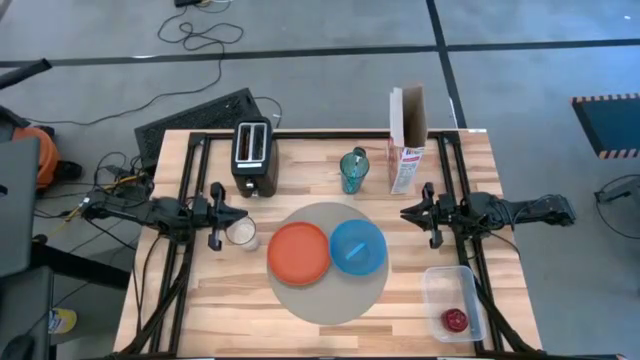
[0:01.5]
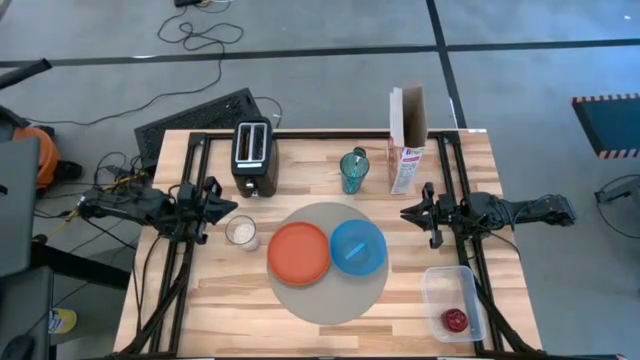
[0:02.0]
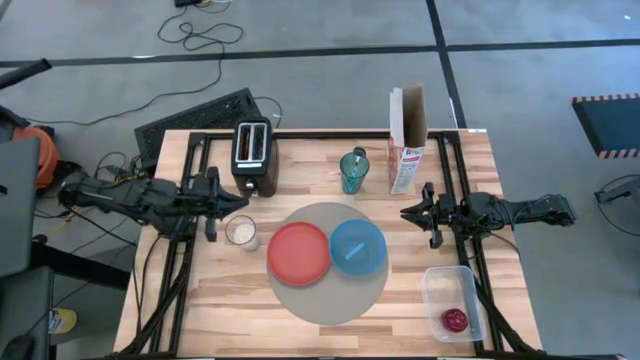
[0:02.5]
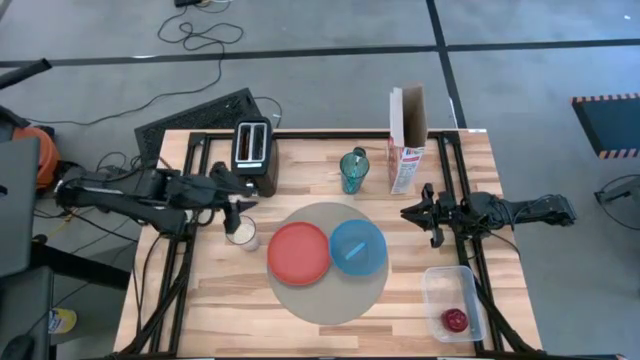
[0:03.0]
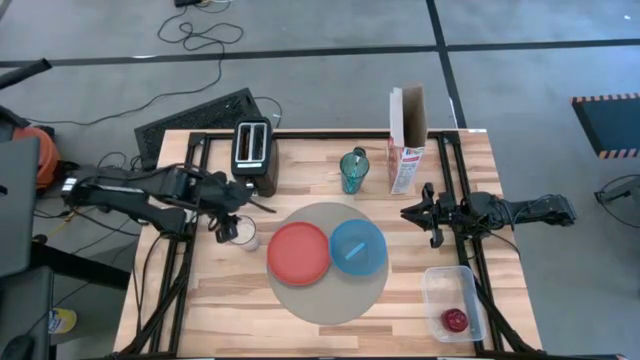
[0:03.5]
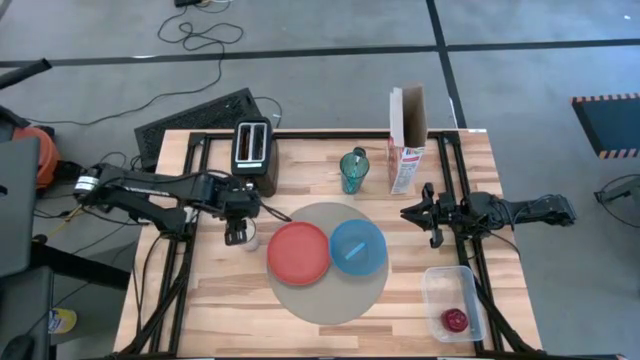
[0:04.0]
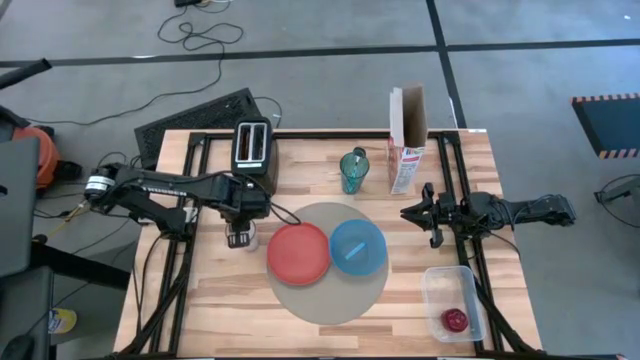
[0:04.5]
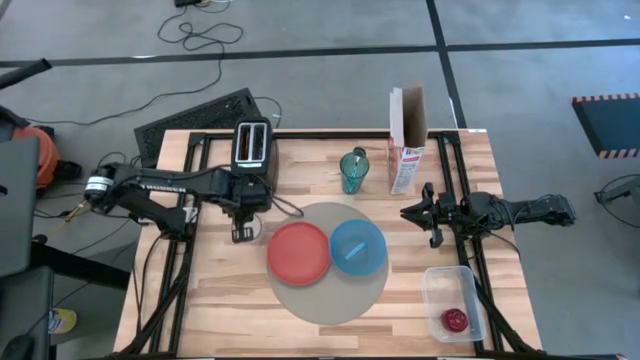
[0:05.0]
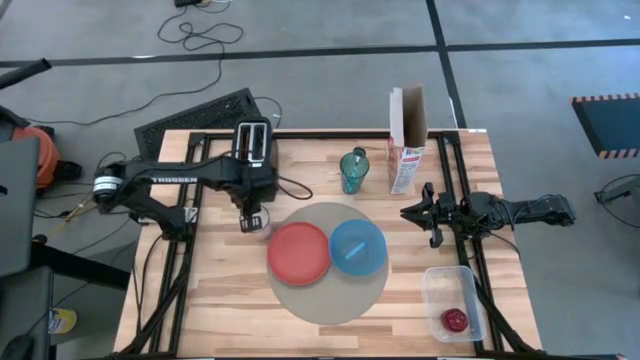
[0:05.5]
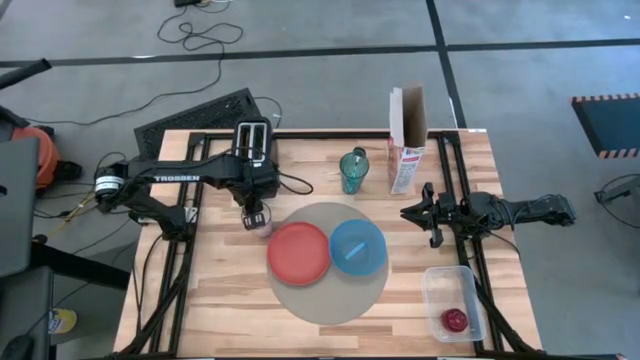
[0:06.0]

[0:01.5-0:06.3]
Task: Arrange a breakfast setting
Move the cup with milk to the top left of the placemat

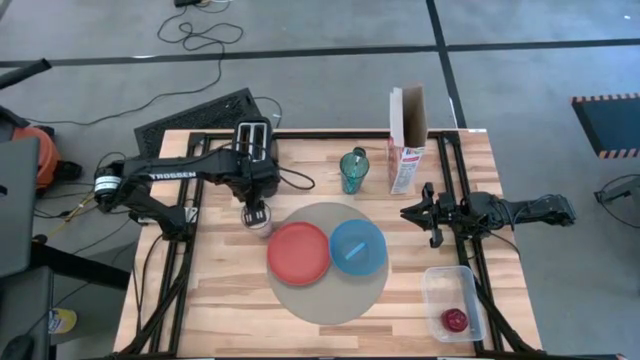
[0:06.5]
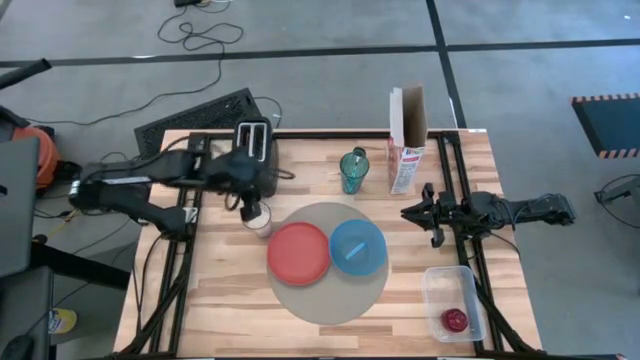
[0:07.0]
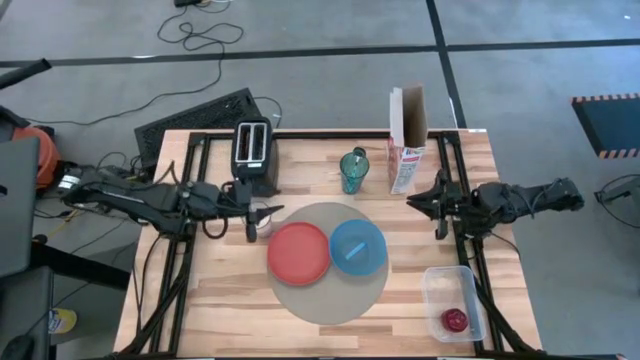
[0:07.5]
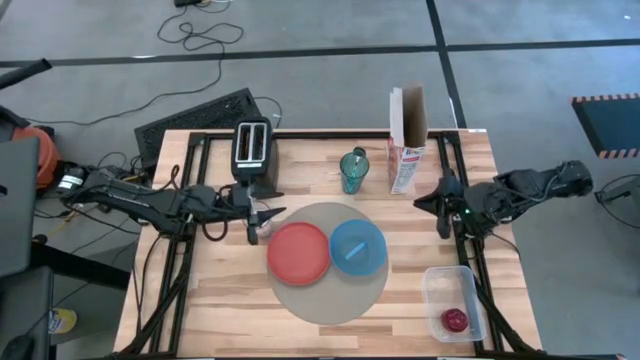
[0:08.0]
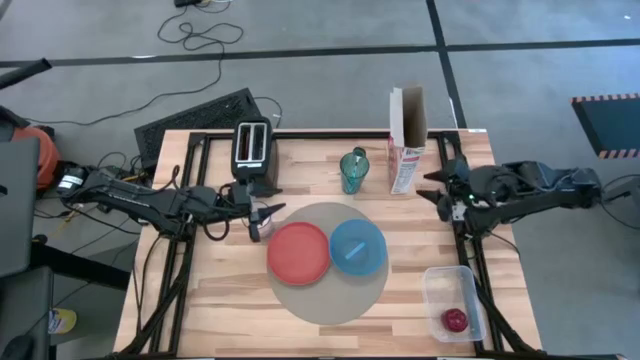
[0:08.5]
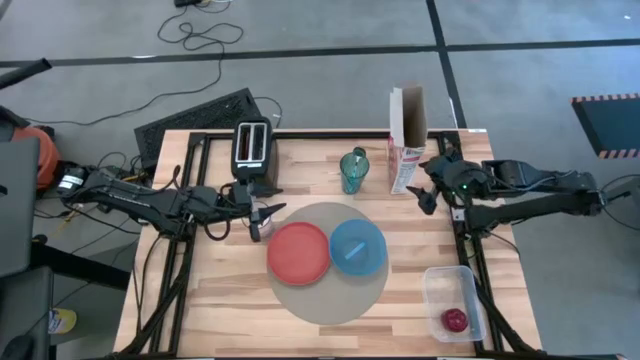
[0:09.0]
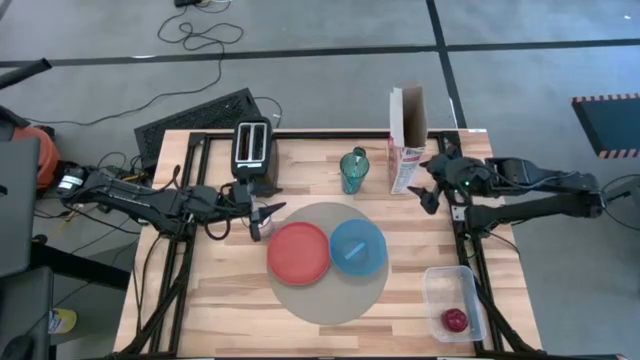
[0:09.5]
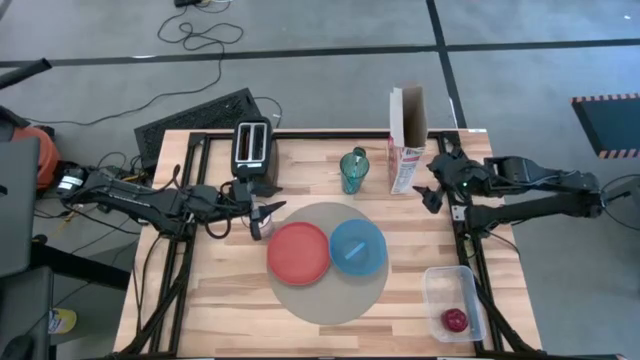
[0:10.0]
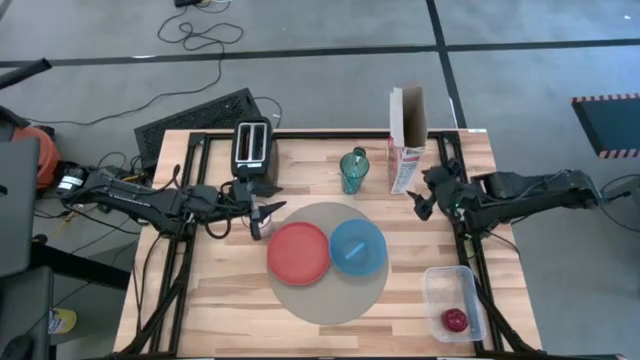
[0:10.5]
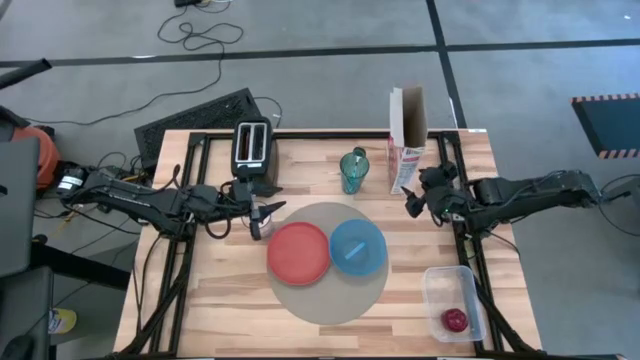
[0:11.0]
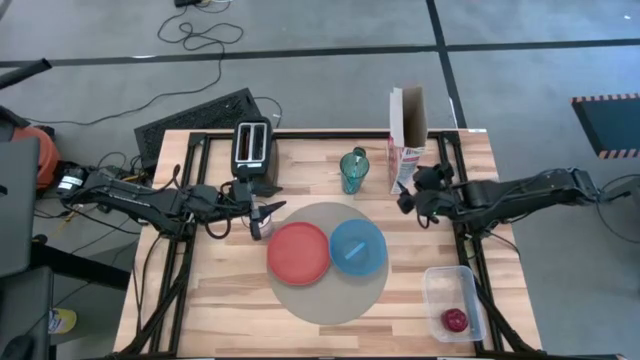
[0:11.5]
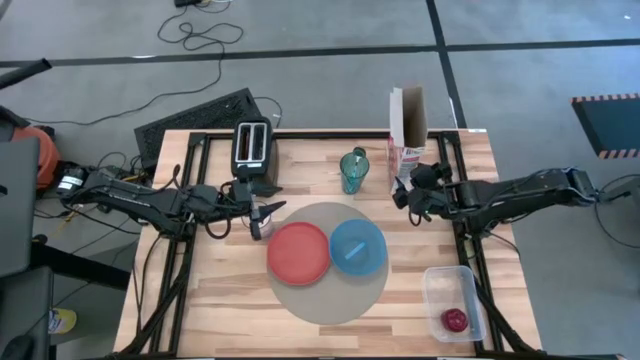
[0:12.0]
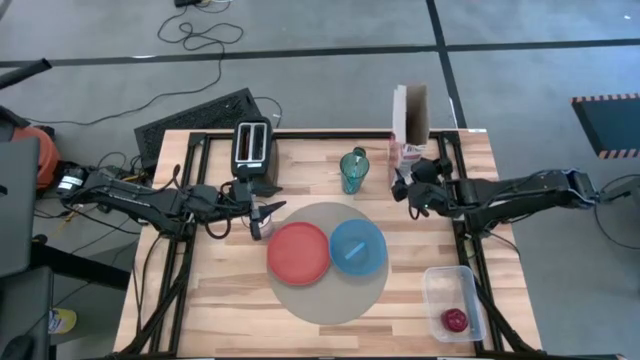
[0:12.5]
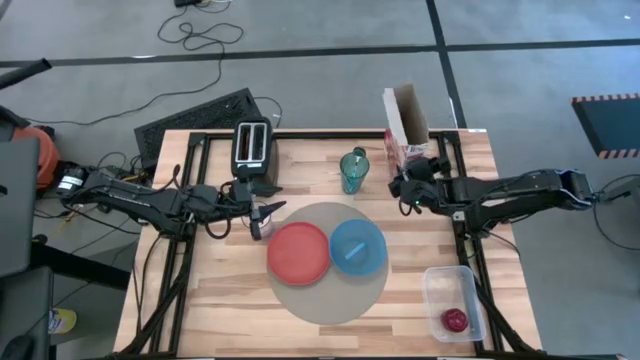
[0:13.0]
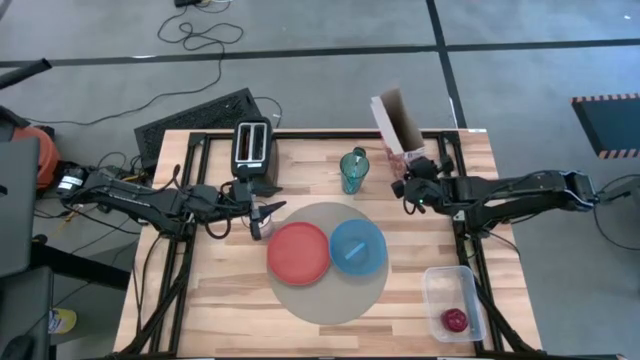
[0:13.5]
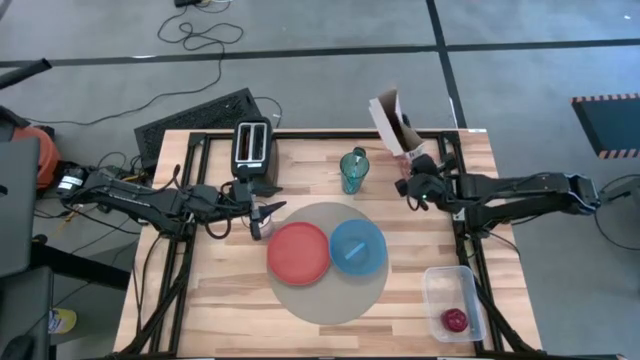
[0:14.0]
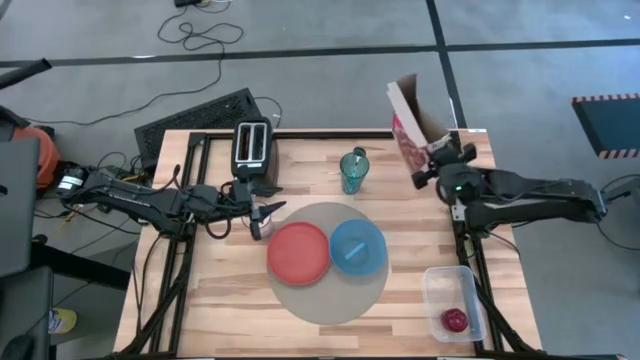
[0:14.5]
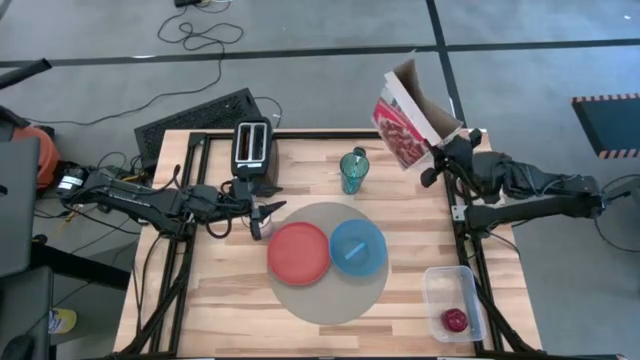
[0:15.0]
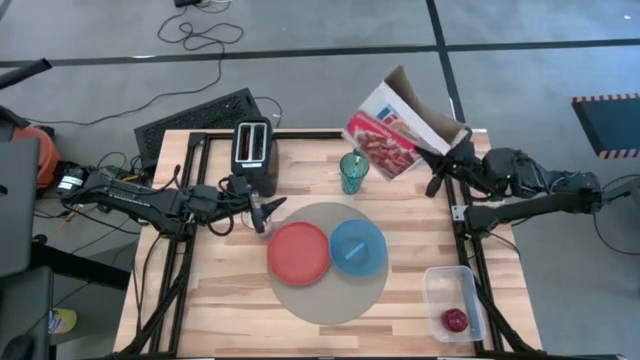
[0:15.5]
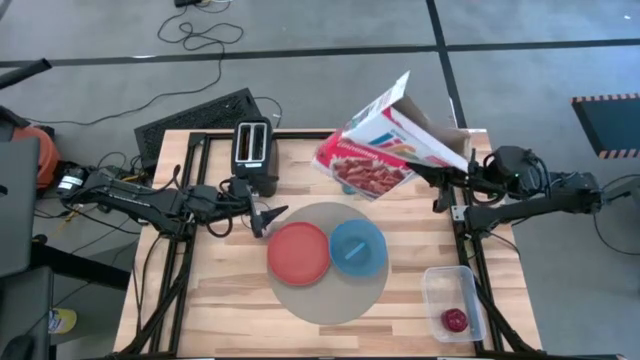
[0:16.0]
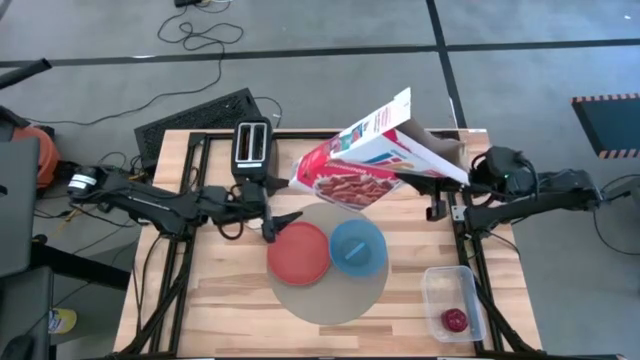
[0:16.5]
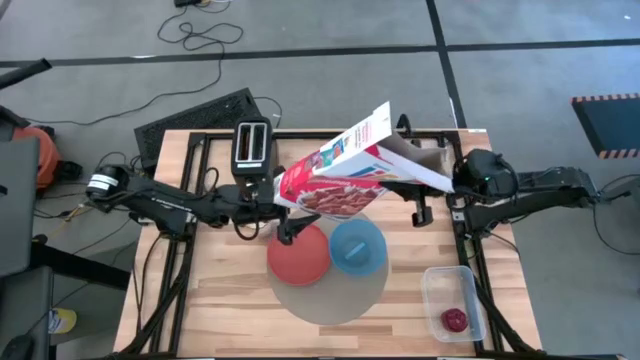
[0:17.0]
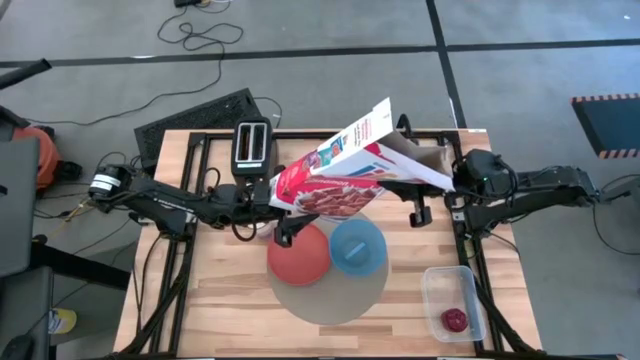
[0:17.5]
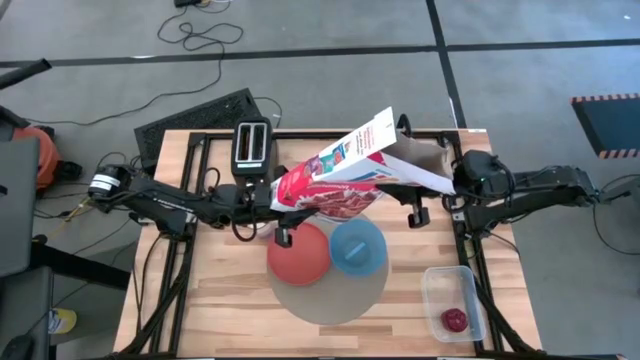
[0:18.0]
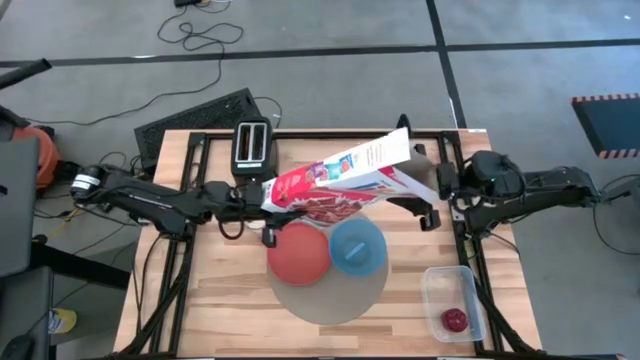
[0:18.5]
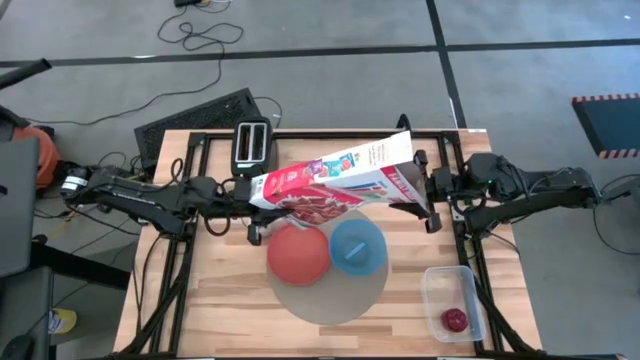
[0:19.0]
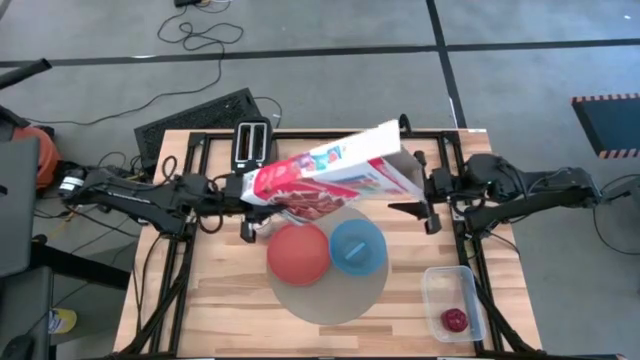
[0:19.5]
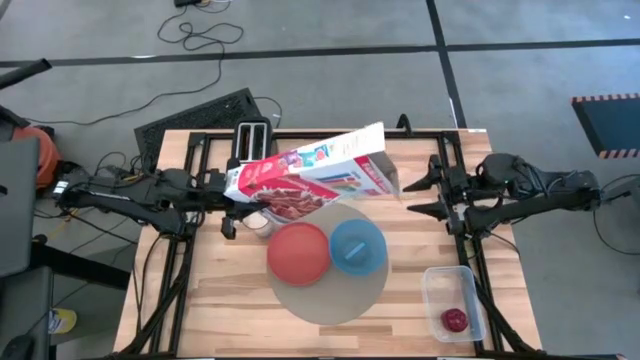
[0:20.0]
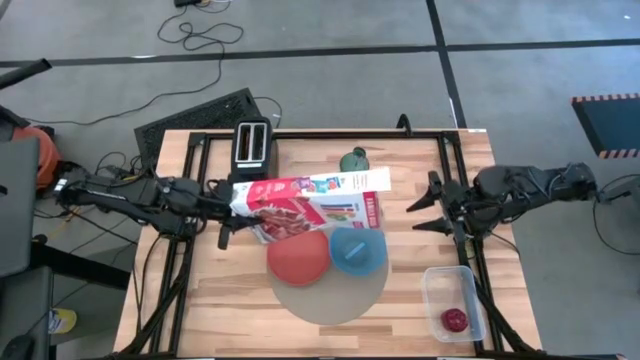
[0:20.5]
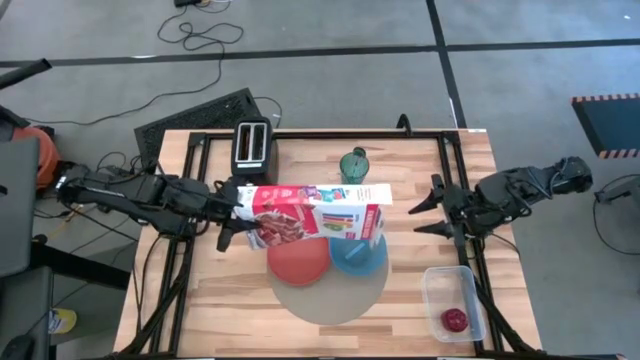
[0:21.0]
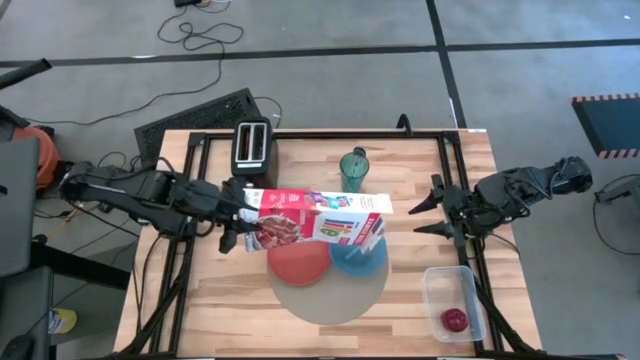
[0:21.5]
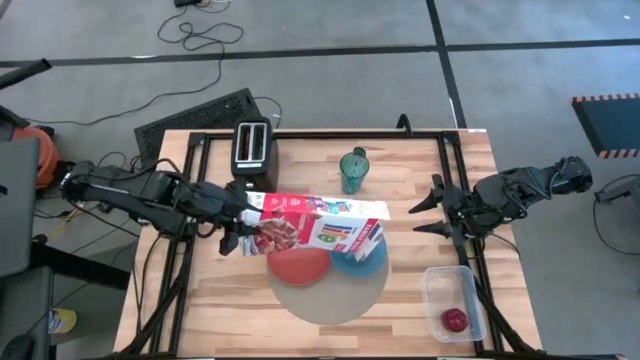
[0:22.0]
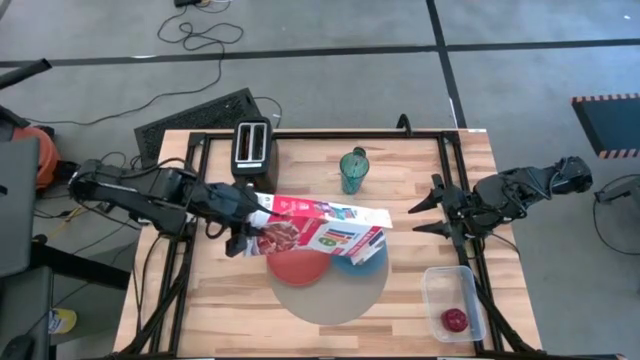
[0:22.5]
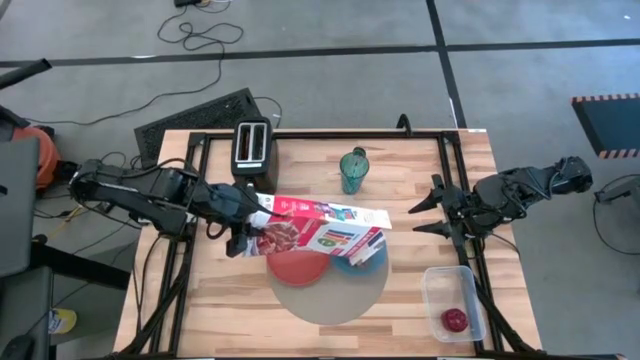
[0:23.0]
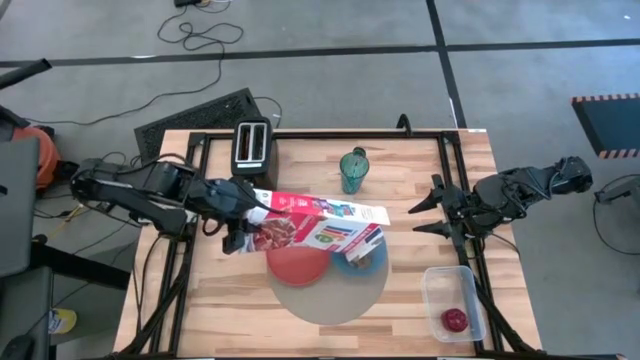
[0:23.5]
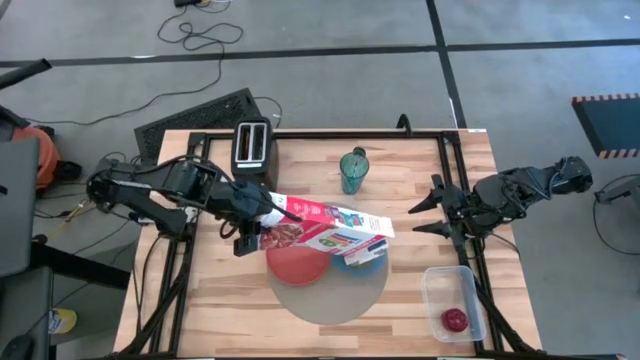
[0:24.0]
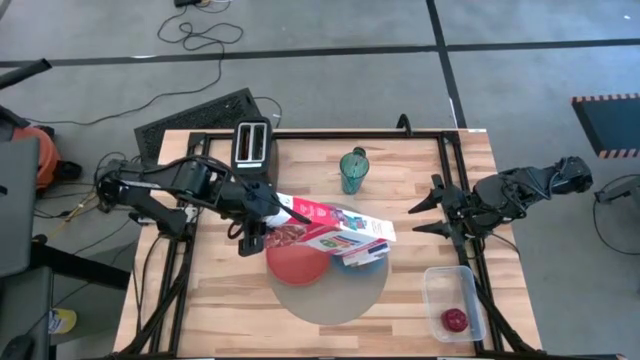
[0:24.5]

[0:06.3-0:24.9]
Pour the cereal from the cereal box into the bowl
